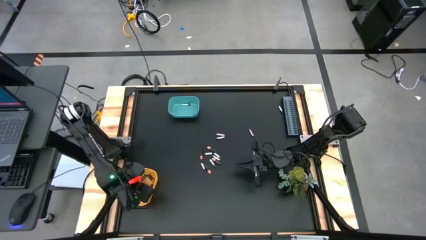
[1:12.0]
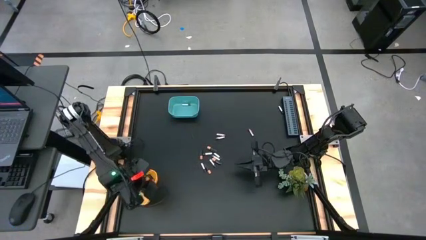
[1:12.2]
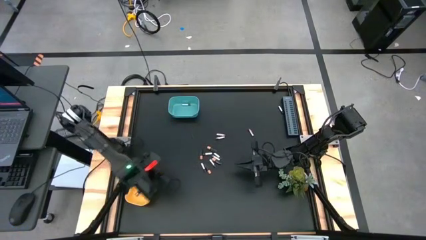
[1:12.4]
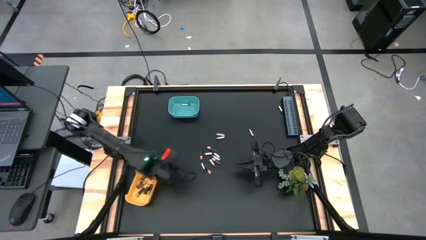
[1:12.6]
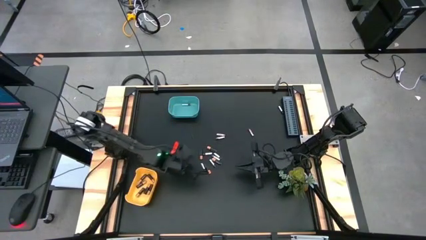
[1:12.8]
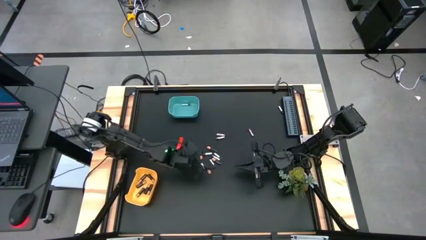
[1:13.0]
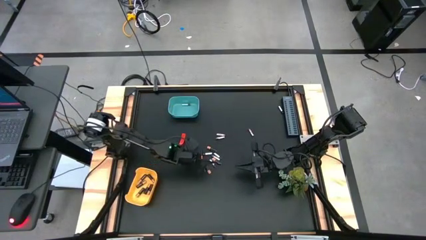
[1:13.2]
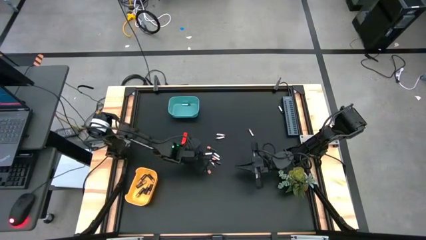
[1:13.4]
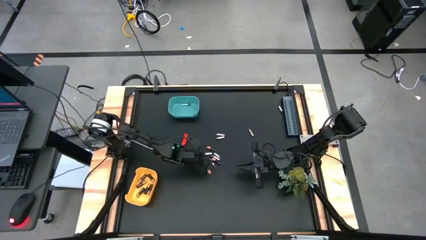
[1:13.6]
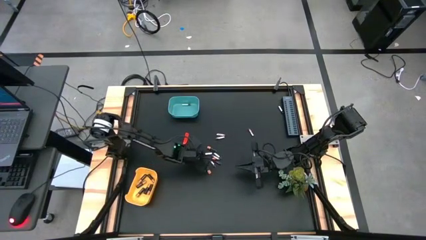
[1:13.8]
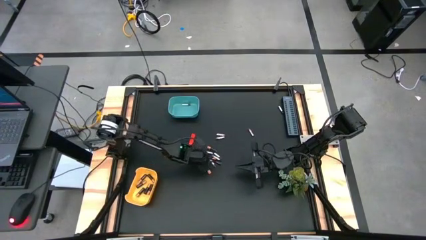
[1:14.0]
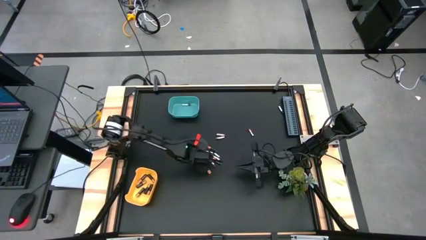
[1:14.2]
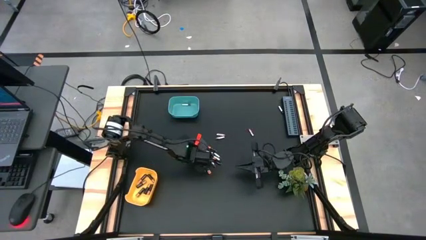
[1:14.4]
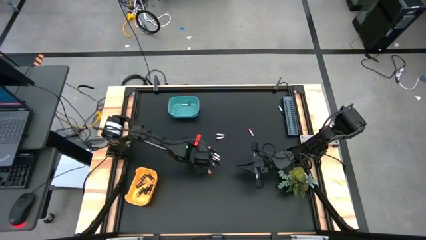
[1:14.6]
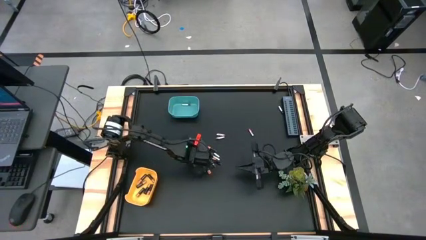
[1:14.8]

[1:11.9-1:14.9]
Task: Sort batteries
Put the black battery into the yellow bin

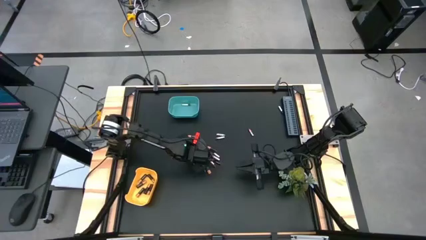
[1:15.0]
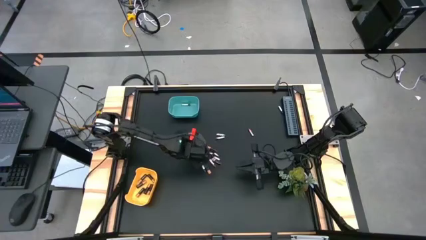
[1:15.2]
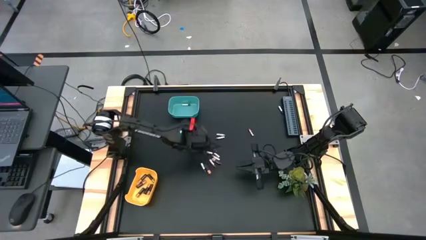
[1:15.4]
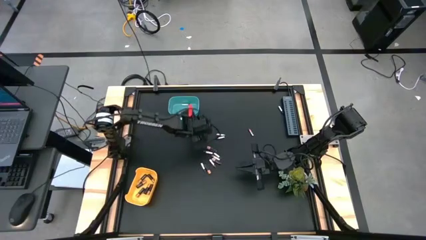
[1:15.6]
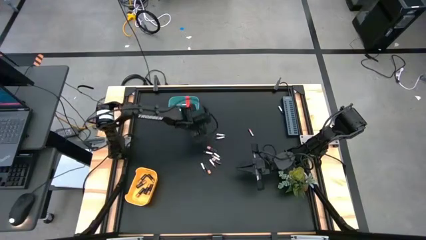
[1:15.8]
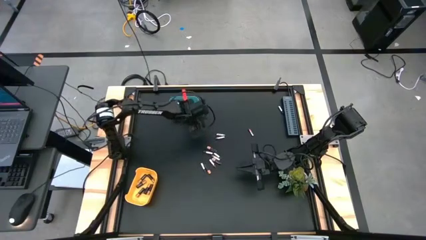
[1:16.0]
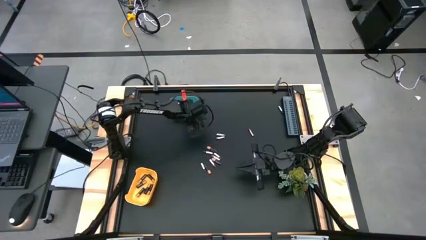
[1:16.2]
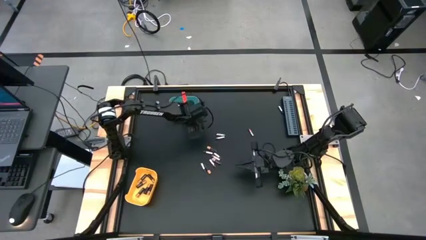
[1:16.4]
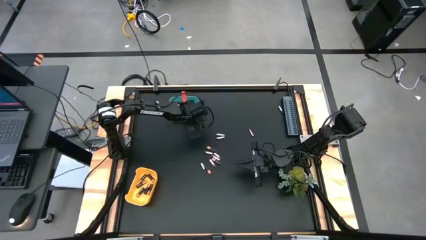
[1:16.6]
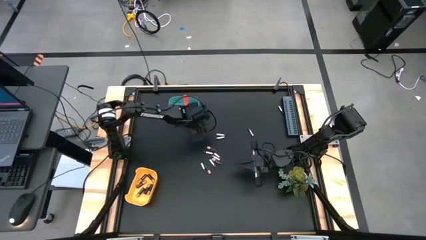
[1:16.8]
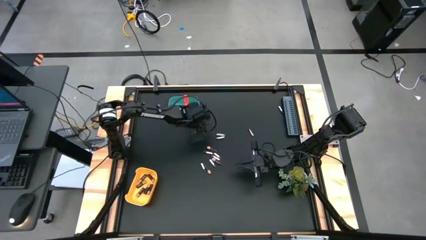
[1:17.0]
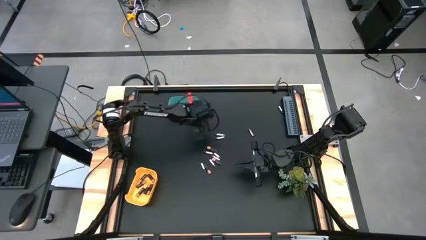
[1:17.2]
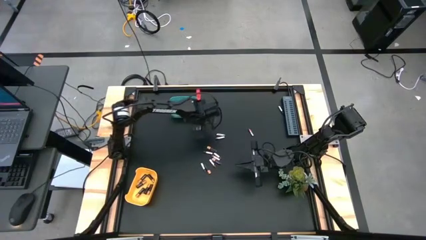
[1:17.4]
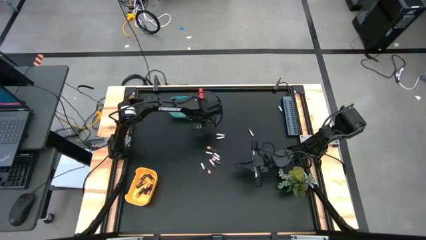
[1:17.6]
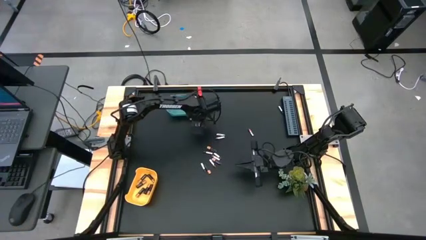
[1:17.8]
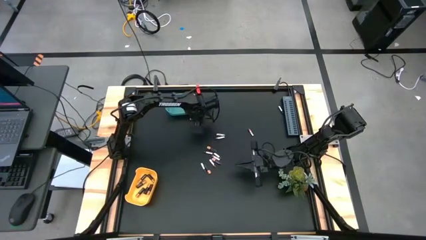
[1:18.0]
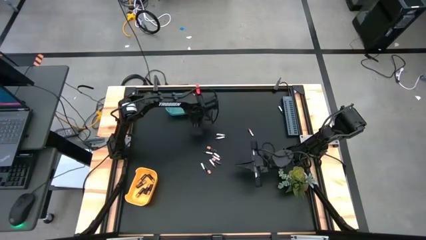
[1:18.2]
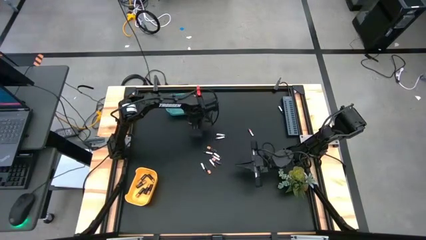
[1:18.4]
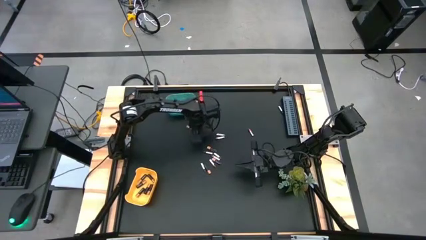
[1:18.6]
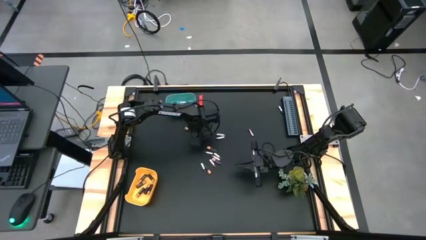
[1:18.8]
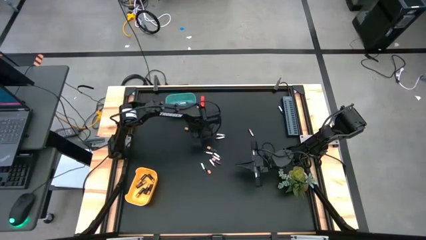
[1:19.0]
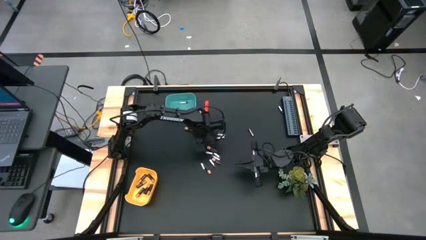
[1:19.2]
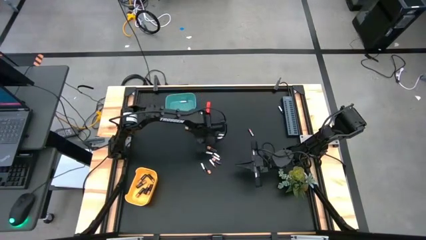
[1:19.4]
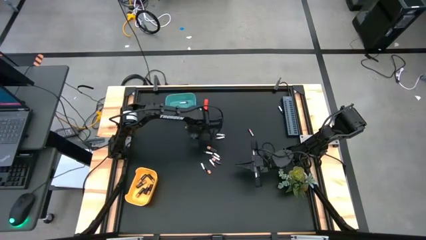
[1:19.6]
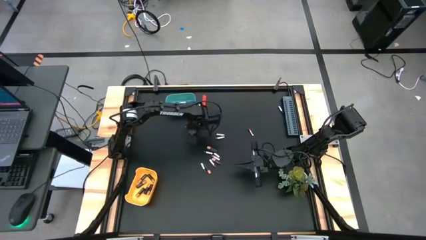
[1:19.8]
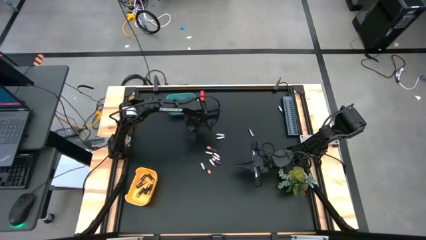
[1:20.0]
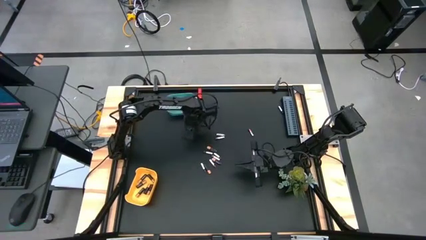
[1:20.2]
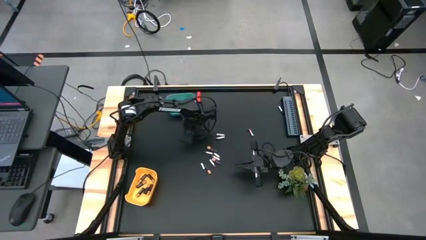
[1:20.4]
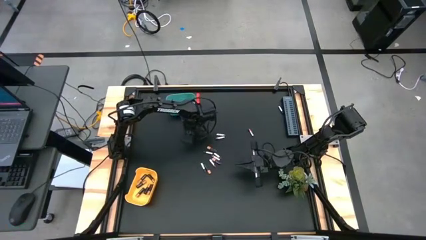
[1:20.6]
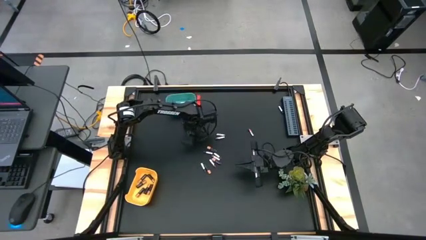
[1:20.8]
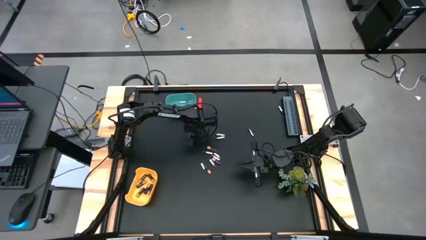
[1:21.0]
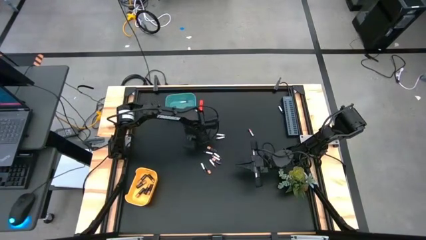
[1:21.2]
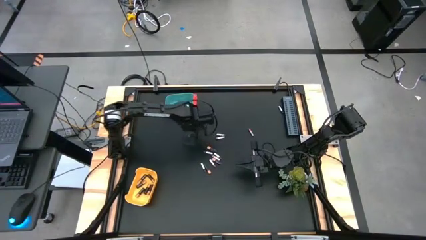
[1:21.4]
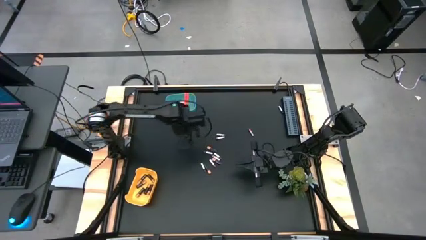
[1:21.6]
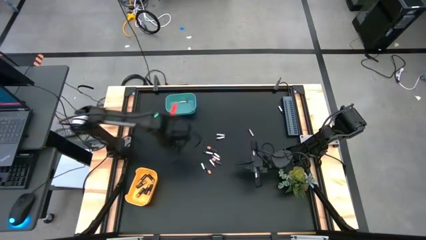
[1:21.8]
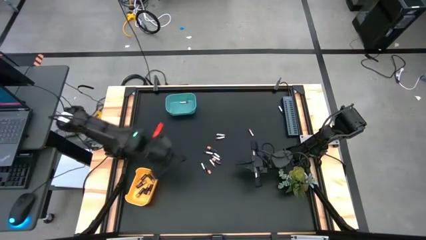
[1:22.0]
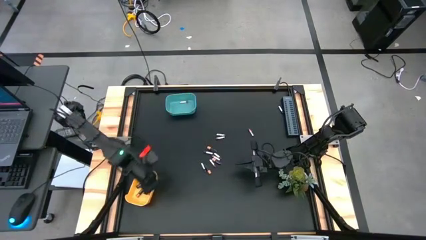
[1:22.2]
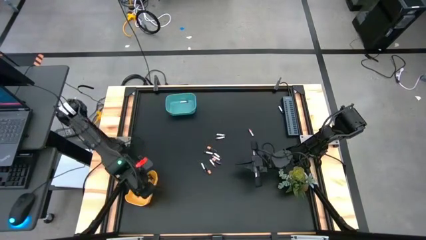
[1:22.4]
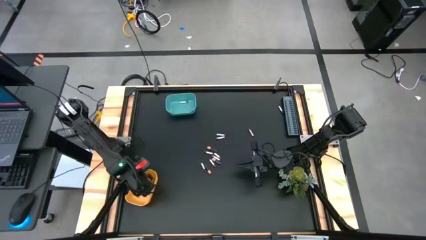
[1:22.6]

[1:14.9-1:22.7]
Put the black battery into the yellow bin

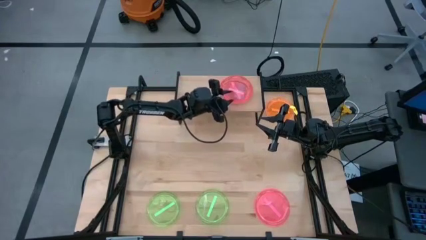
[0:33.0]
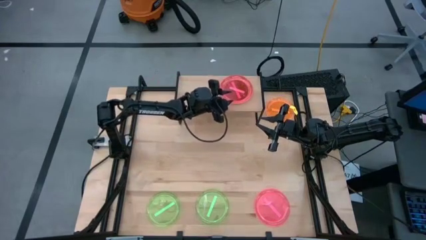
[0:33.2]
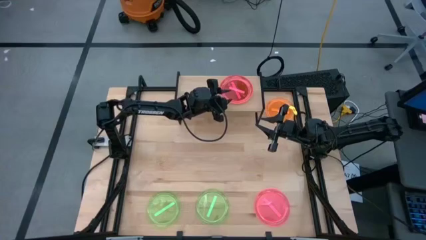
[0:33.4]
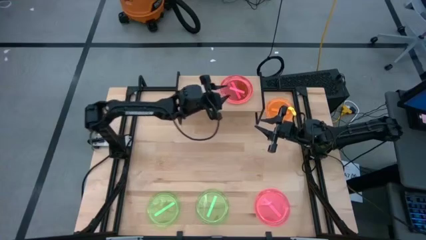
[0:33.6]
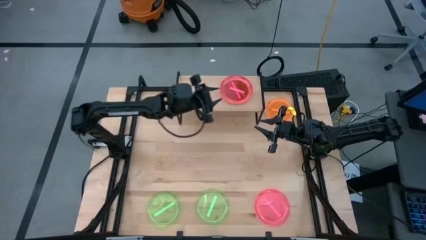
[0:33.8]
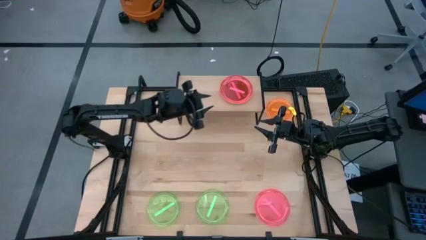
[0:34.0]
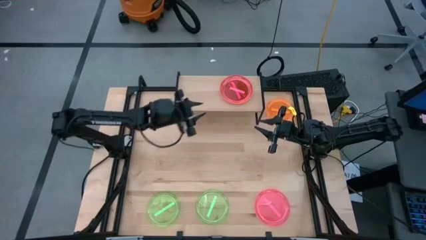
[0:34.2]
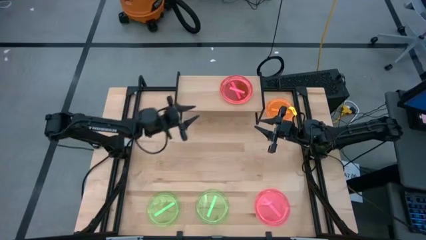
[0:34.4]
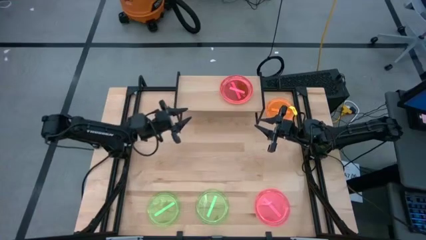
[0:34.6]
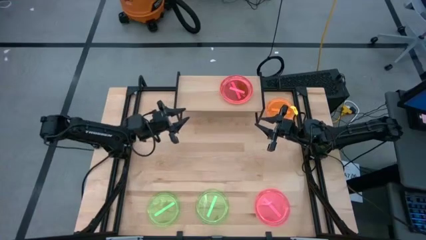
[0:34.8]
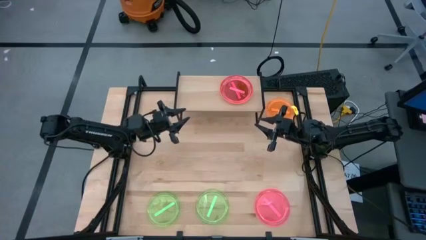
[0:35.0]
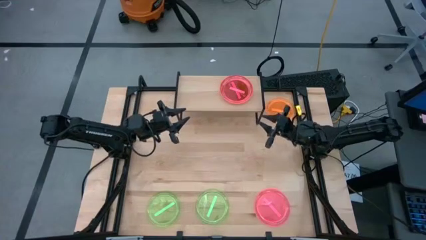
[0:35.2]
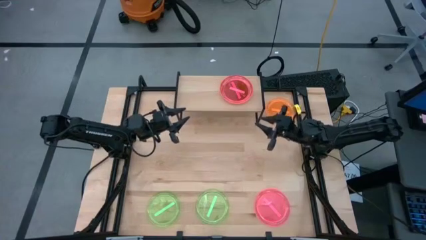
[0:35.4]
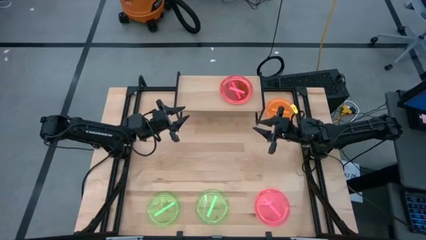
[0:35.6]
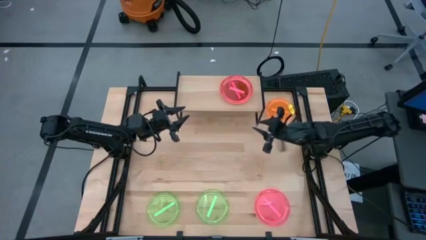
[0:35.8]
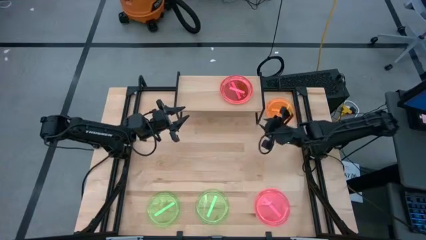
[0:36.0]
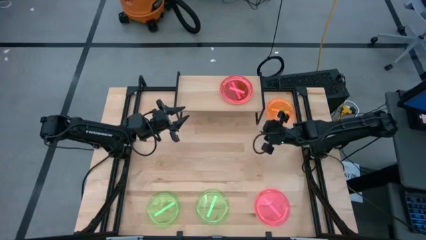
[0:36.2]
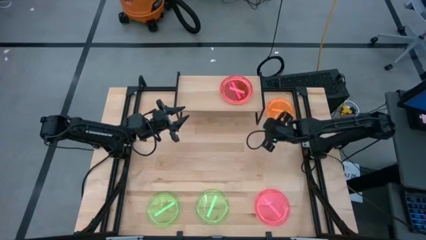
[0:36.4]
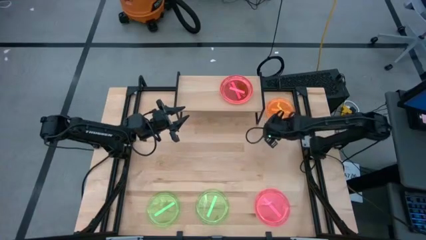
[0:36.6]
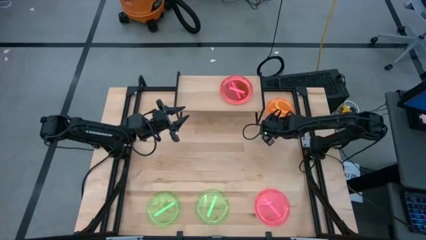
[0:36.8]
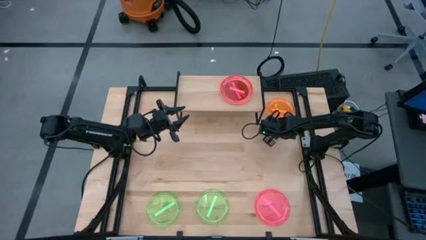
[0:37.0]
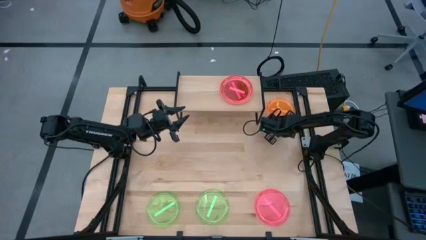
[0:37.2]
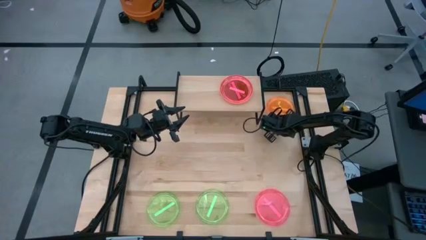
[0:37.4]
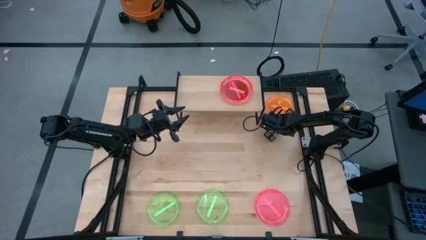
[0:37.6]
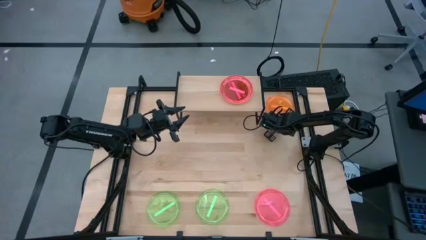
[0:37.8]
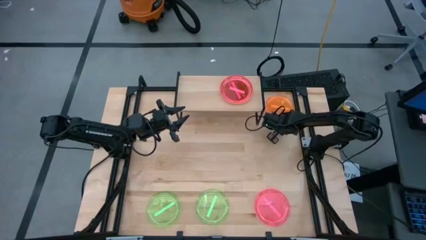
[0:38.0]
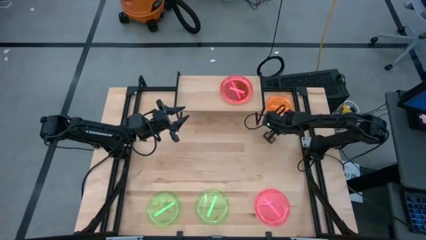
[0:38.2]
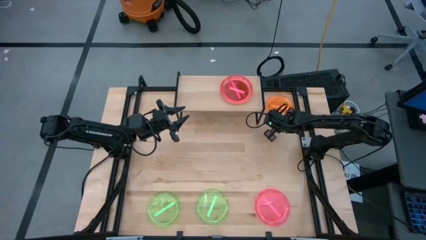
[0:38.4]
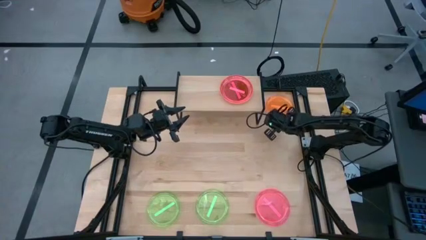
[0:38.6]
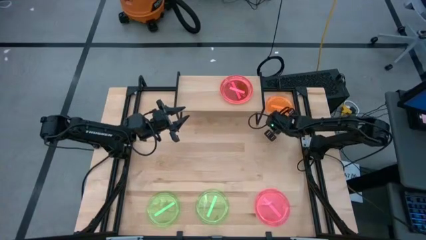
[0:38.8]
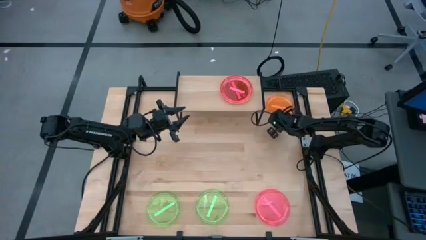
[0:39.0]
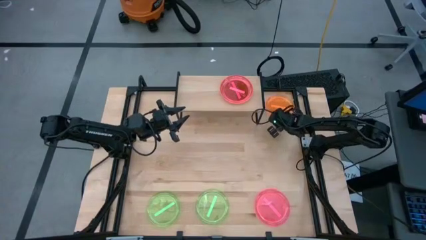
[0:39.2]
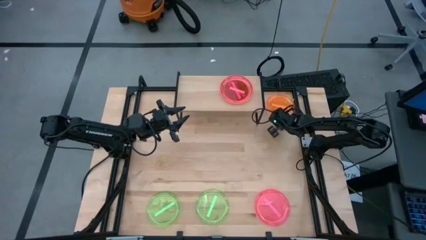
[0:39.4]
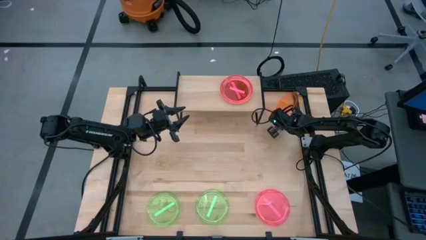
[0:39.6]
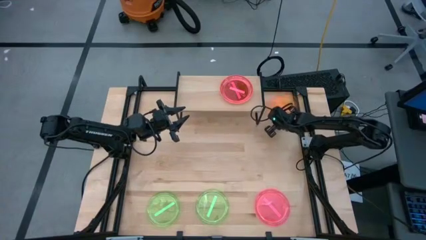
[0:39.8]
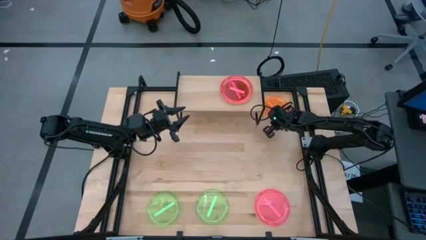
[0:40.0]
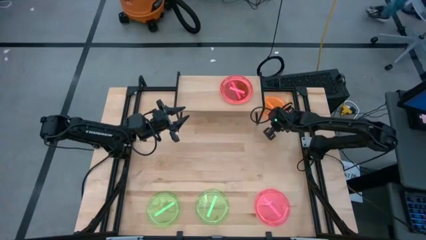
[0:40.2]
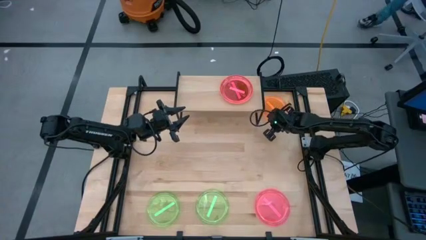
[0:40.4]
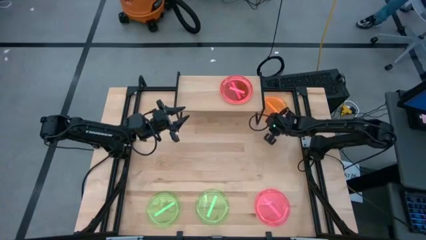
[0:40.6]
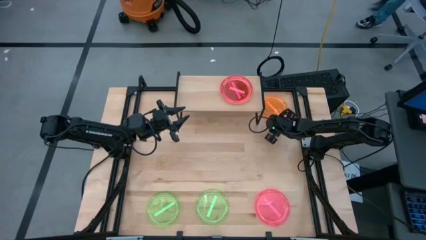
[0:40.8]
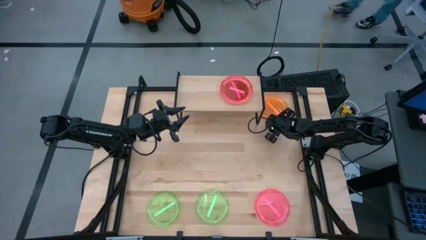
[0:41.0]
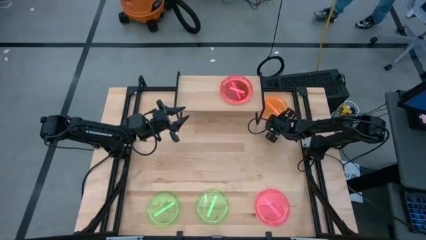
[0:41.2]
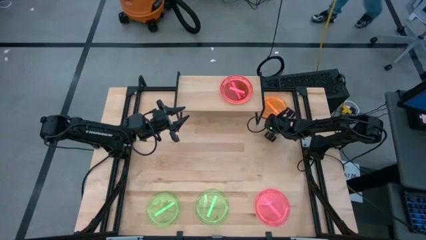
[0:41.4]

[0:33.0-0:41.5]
Task: Place and stack plates onto a shelf
Put the orange plate on the shelf
